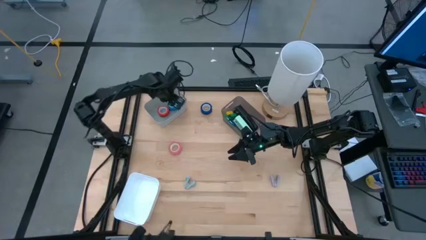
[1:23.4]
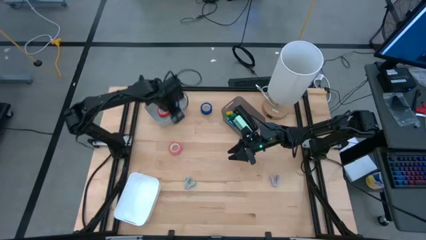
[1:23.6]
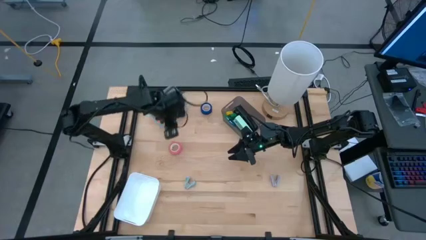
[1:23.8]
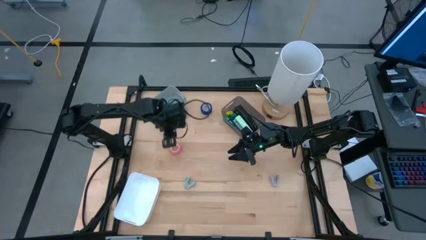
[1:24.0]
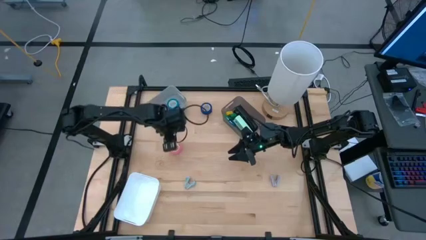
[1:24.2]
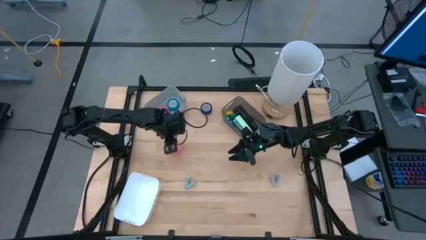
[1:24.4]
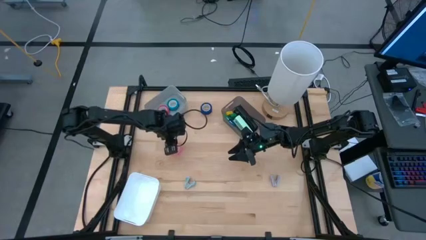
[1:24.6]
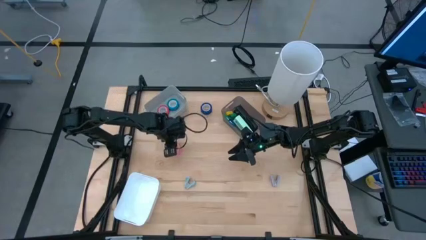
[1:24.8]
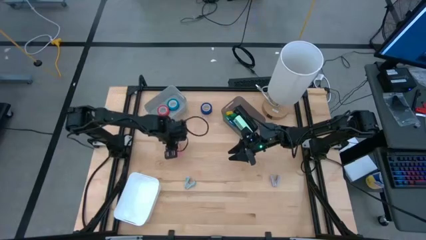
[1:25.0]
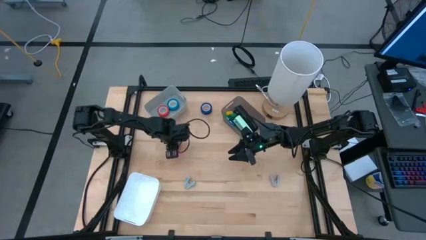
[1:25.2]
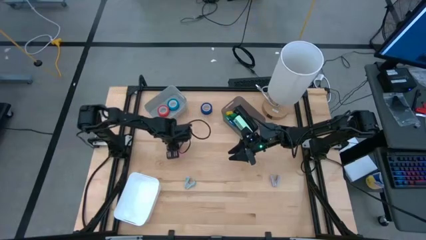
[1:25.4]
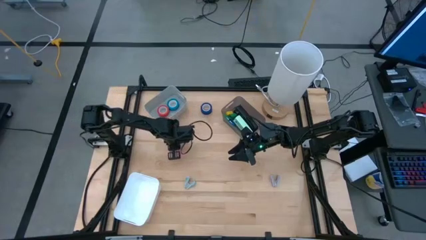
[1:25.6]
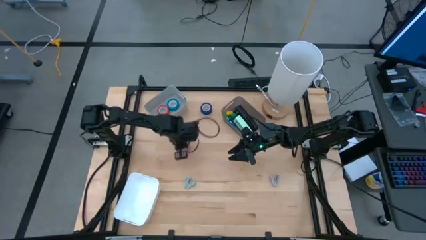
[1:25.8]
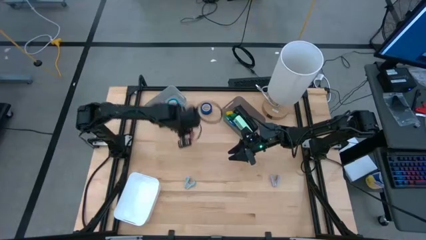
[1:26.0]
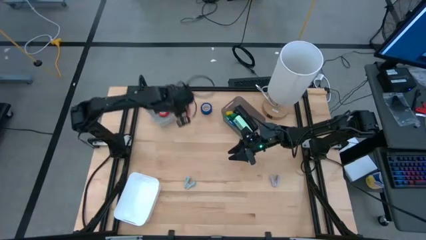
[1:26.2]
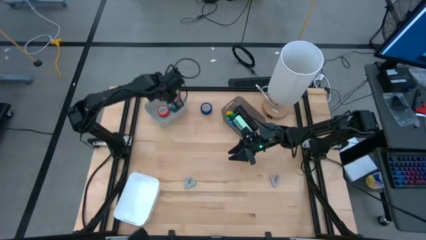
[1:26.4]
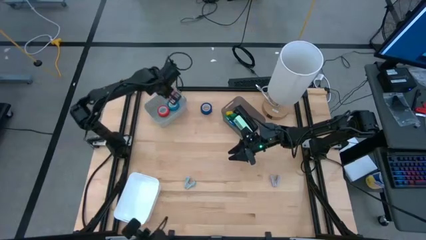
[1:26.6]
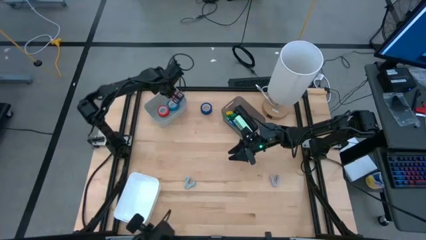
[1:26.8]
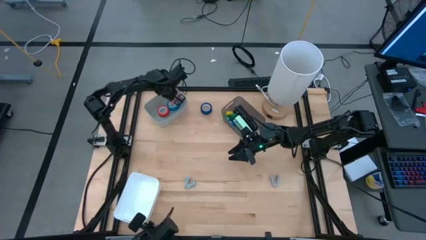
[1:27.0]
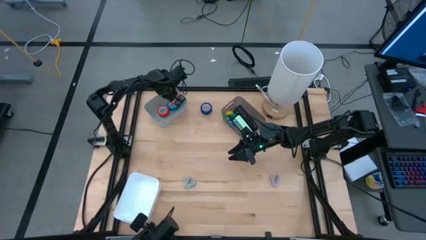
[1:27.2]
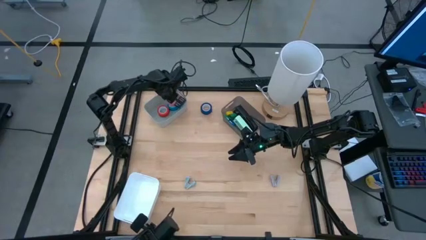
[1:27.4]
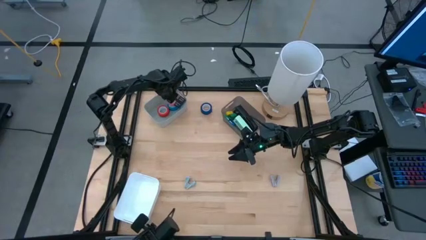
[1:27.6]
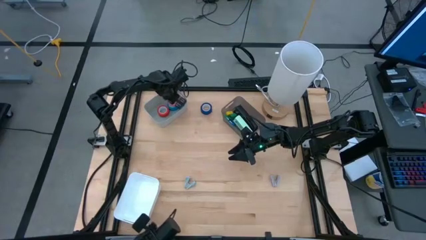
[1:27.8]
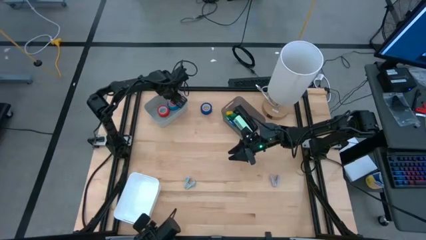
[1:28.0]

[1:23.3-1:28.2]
Task: Pick and place Stapler, Stapler remover, tape
Put the pink tape into the gray bin

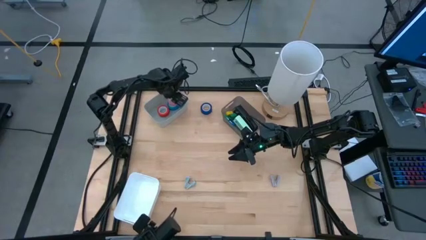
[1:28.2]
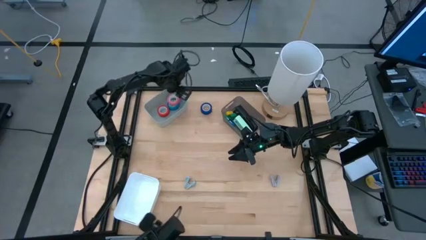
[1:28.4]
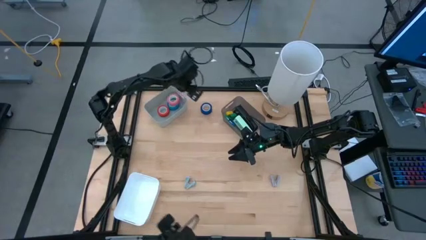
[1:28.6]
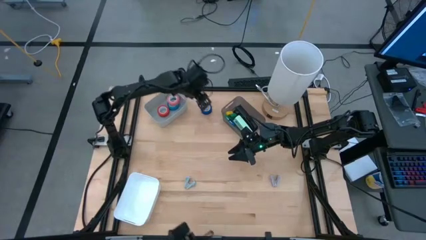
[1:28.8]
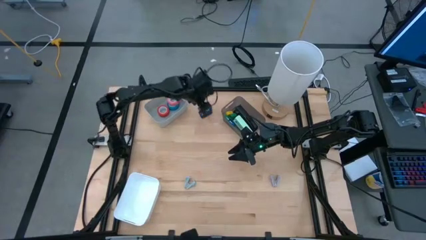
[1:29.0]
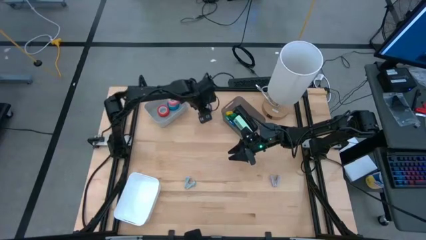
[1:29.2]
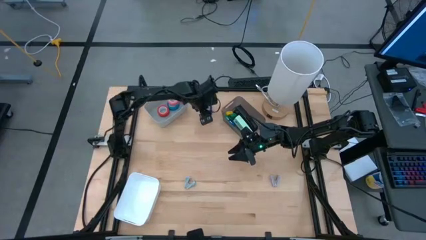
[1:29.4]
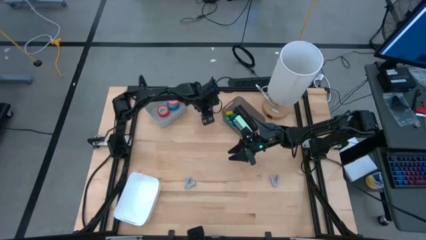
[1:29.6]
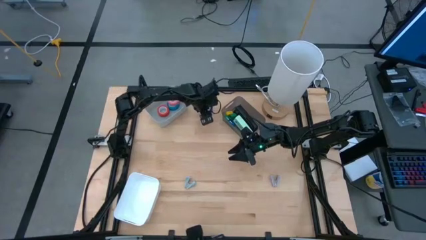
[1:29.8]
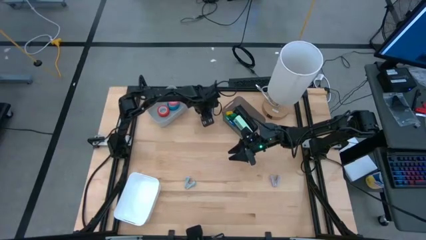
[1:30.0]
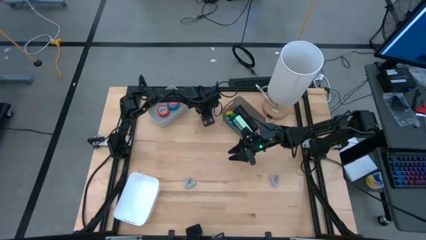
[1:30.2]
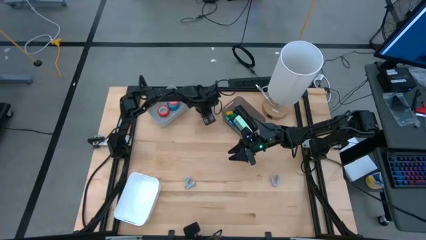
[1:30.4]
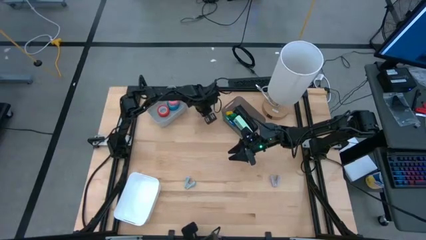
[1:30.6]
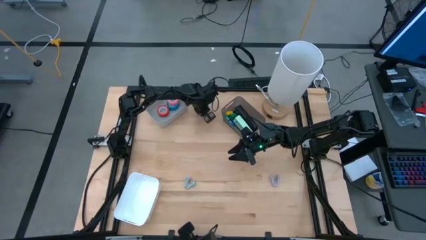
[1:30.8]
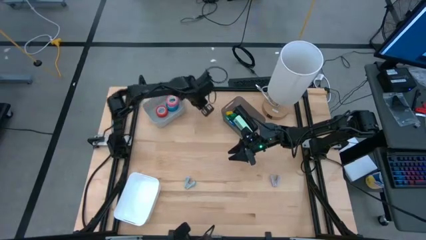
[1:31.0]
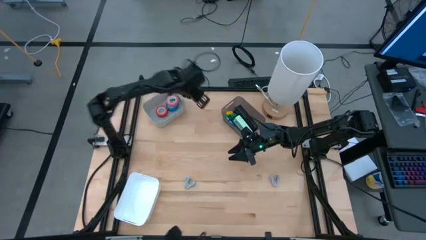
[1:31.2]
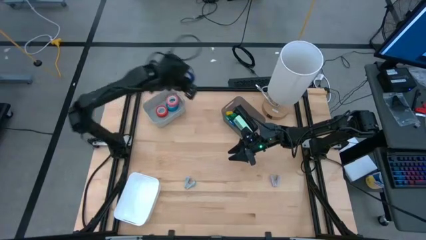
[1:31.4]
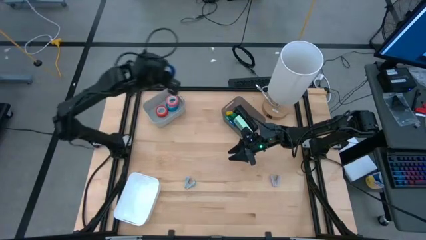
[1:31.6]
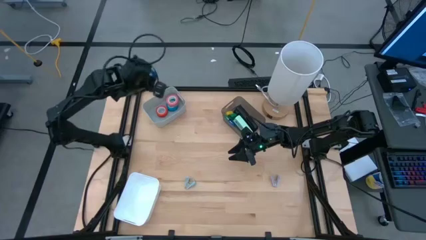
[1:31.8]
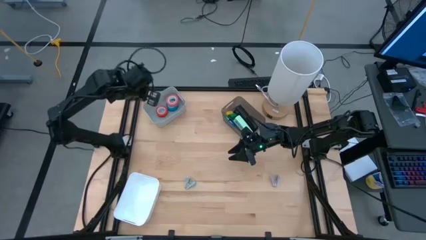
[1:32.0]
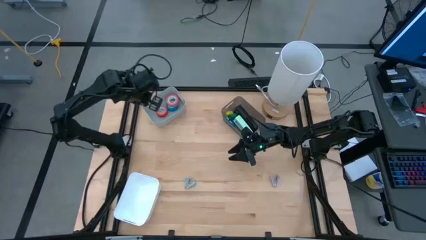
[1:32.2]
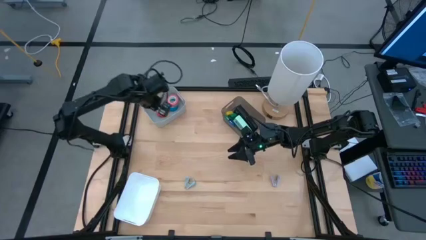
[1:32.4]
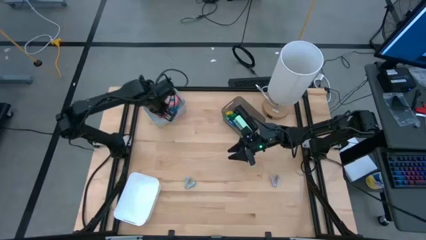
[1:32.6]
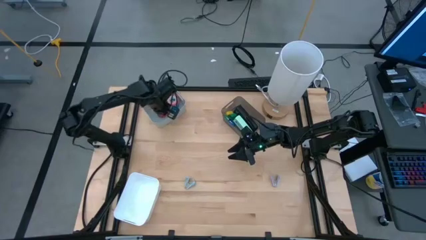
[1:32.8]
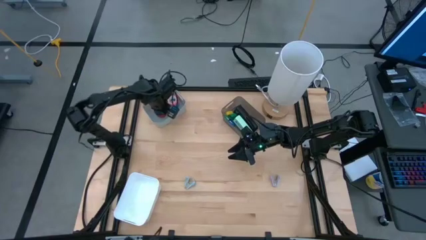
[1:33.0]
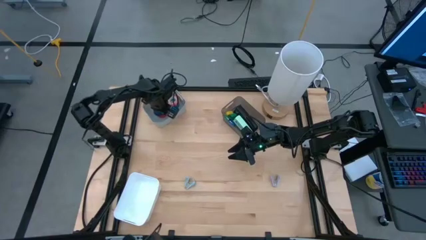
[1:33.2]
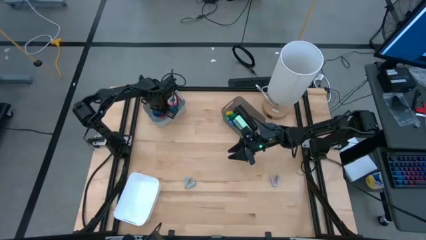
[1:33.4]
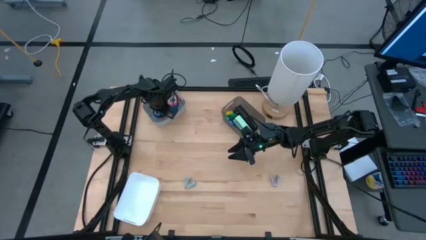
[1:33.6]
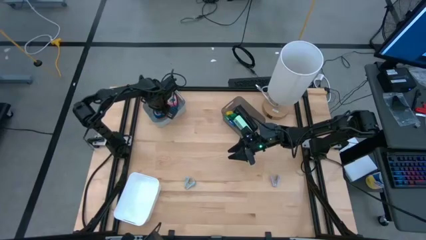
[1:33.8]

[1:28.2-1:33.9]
Put the dark blue tape into the gray bin

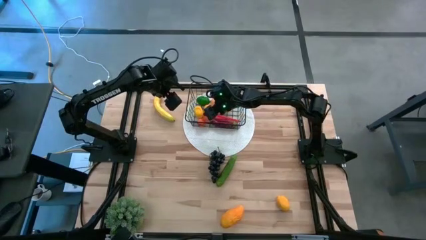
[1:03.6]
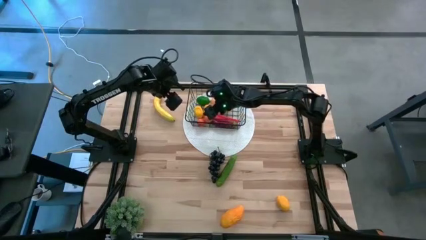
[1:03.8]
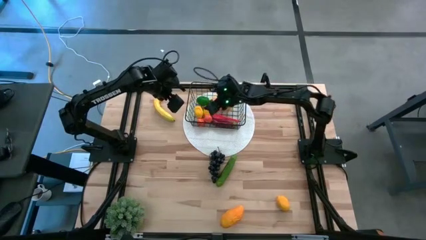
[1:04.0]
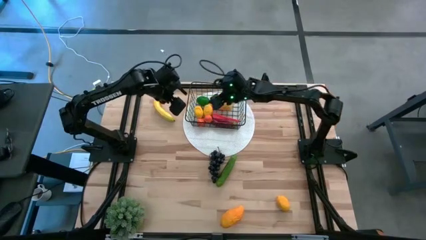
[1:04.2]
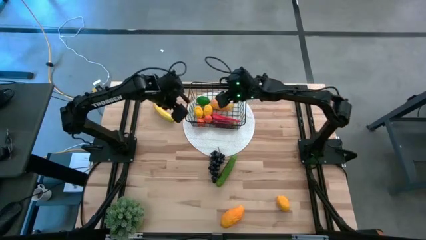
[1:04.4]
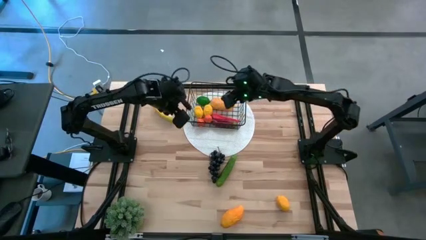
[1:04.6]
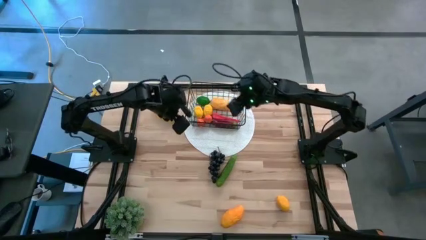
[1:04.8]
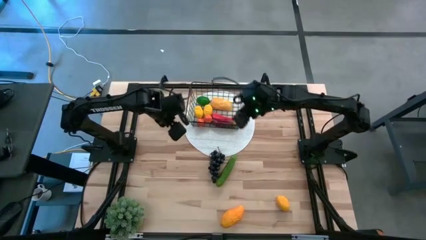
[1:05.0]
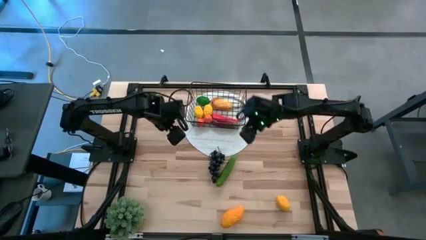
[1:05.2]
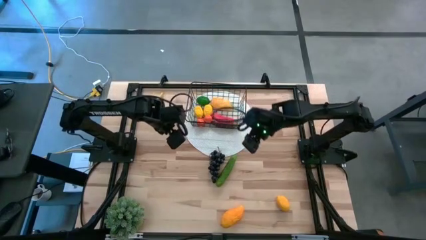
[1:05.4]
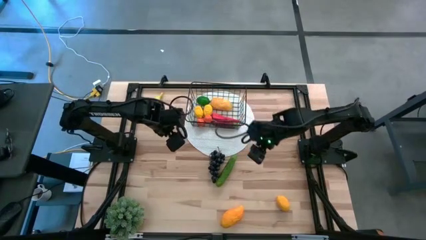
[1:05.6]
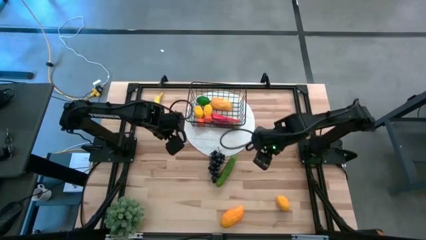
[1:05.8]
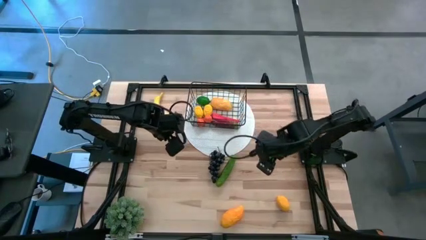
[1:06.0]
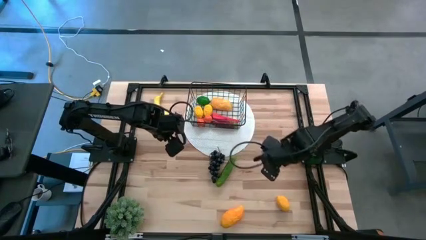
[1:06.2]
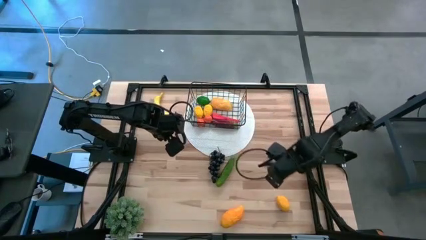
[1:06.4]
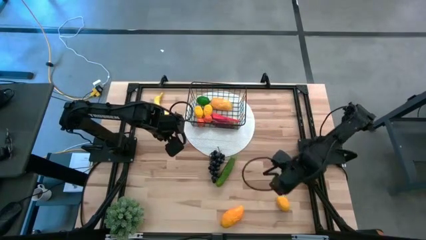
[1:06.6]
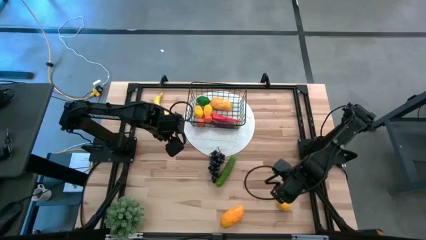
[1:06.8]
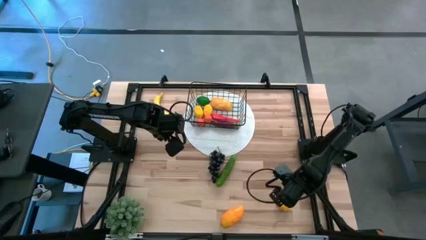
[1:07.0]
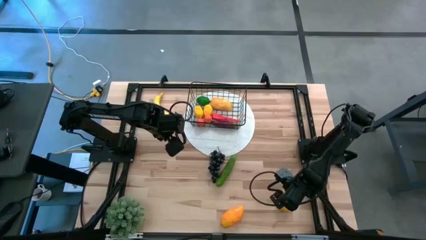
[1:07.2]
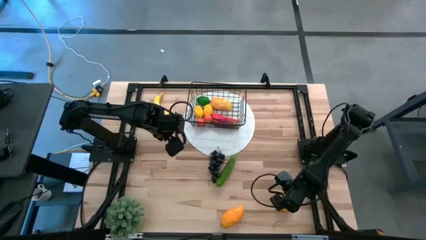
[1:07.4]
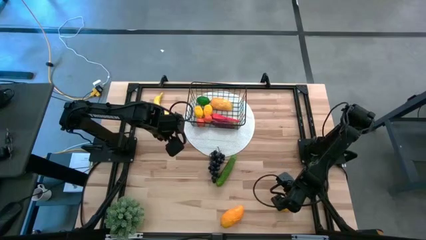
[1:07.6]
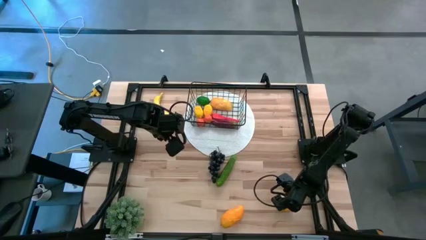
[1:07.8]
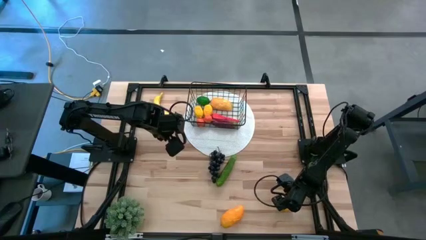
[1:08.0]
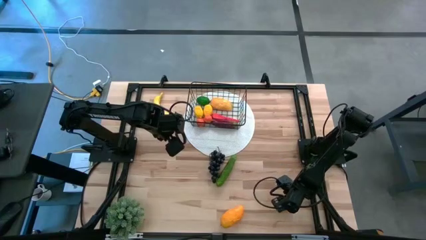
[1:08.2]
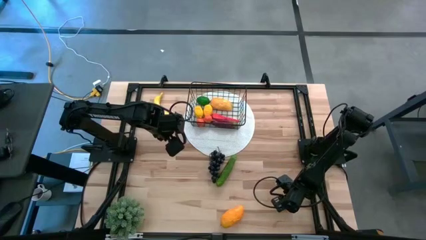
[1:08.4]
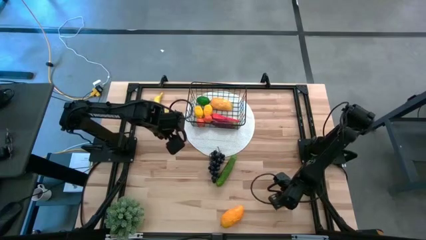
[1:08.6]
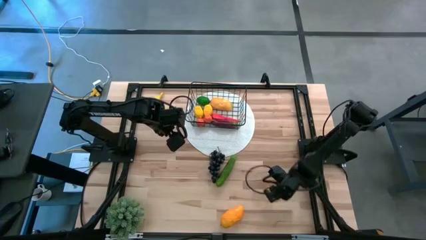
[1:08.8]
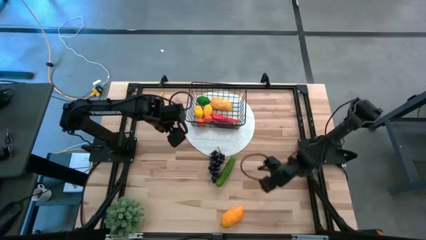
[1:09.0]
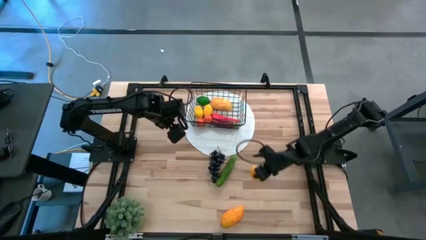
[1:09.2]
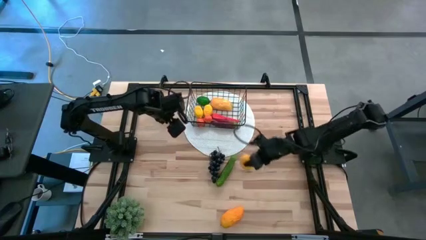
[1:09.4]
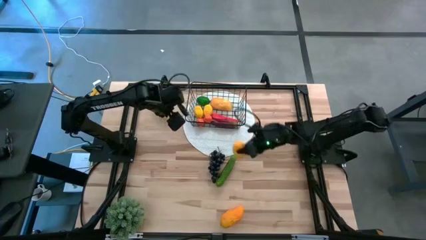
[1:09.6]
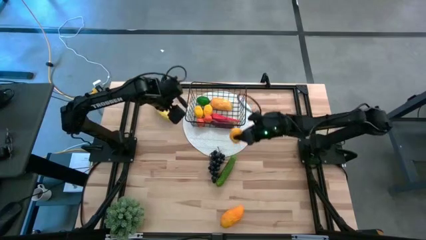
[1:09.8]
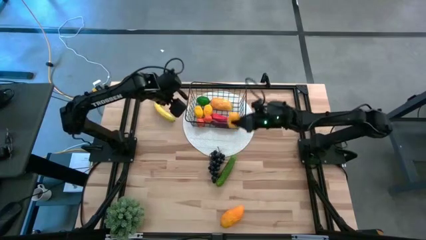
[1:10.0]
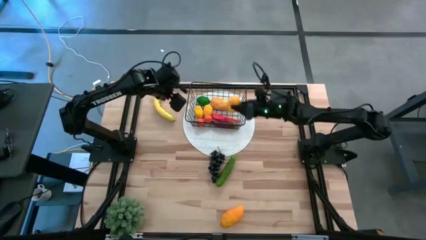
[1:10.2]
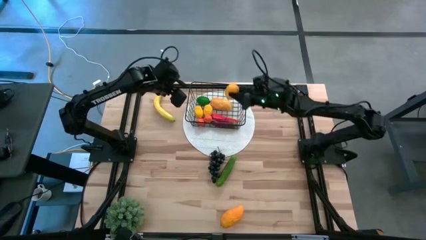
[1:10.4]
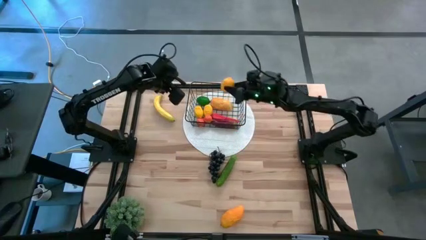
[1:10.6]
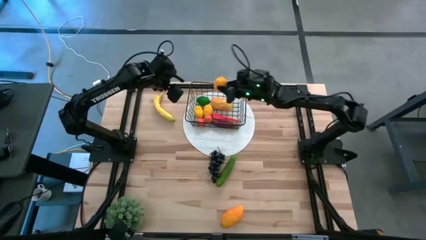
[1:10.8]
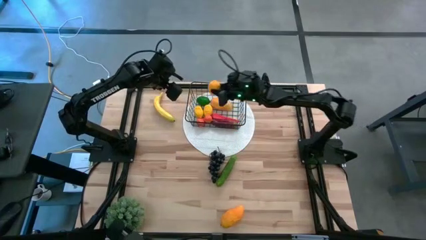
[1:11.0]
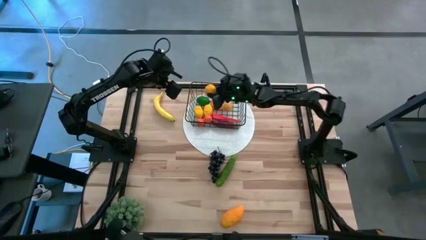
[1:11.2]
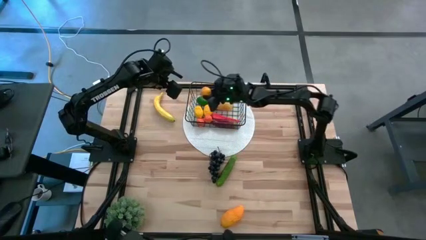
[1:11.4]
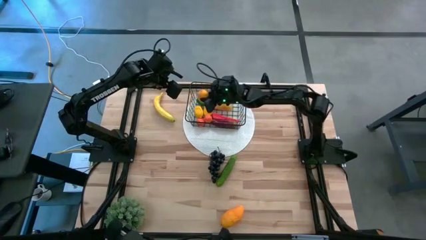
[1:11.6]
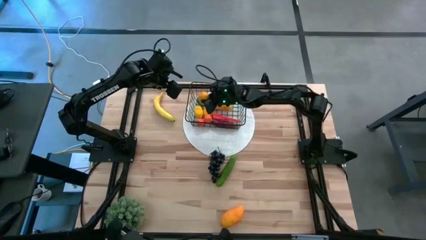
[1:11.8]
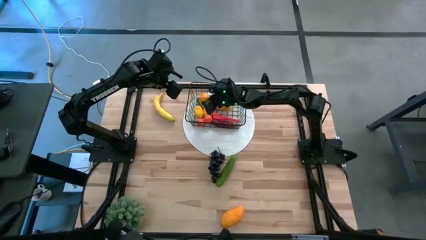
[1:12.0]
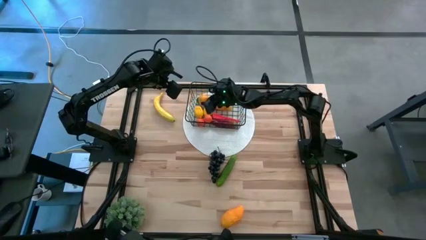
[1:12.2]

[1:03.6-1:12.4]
Task: Build produce basket
Put the yellow lemon into the black wire basket
